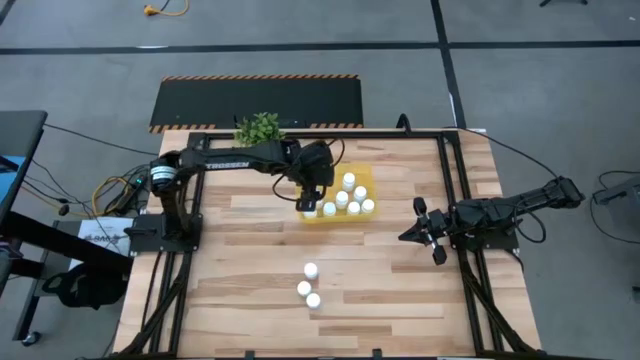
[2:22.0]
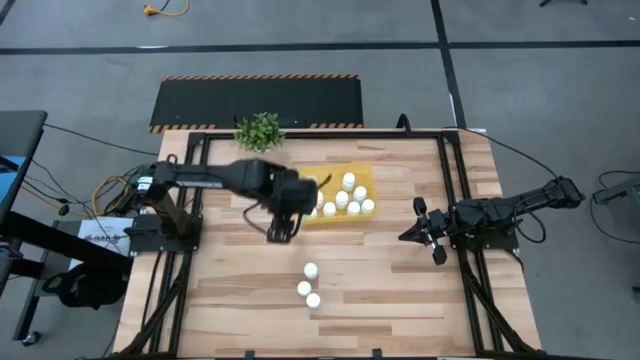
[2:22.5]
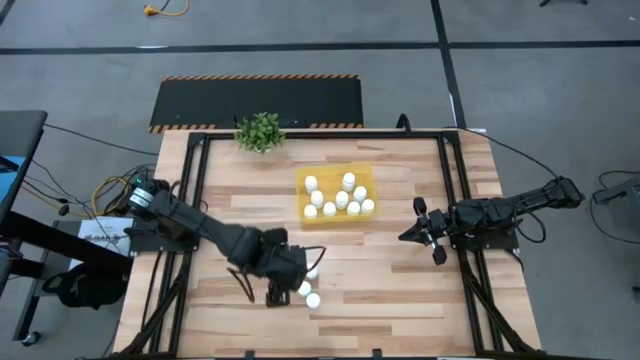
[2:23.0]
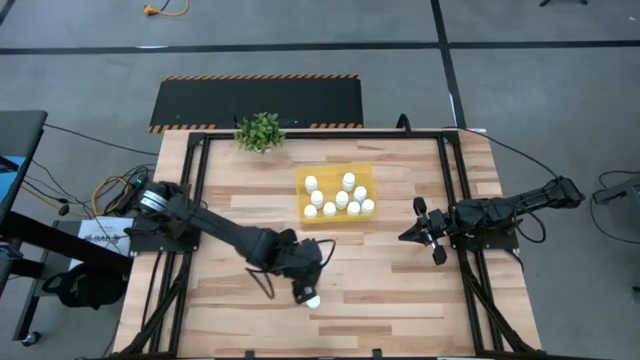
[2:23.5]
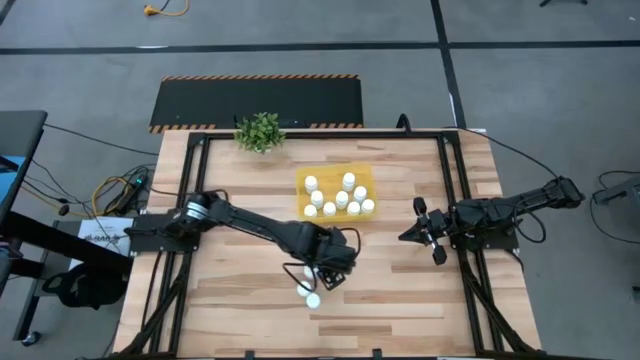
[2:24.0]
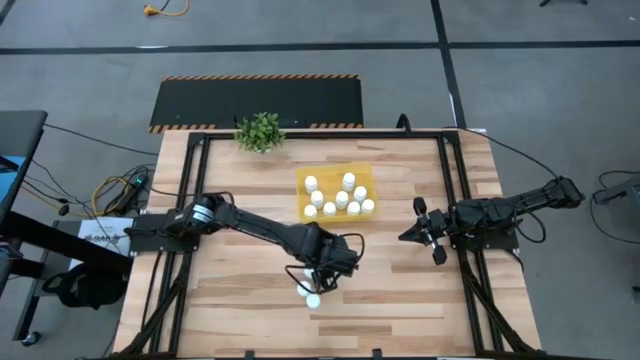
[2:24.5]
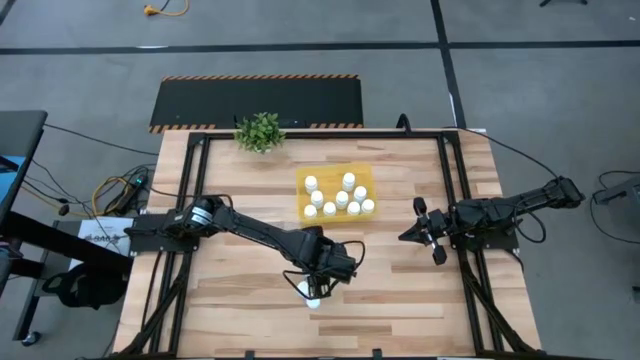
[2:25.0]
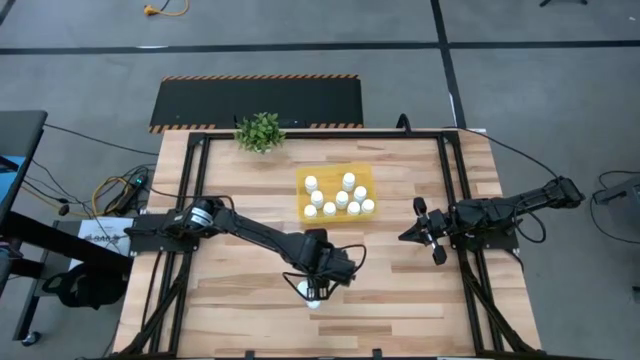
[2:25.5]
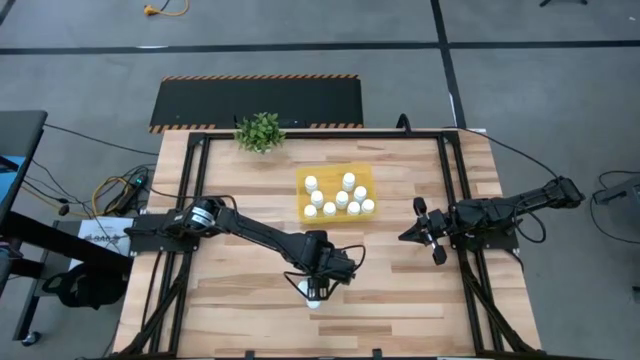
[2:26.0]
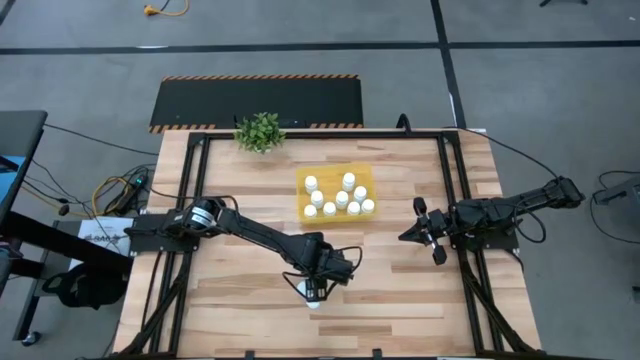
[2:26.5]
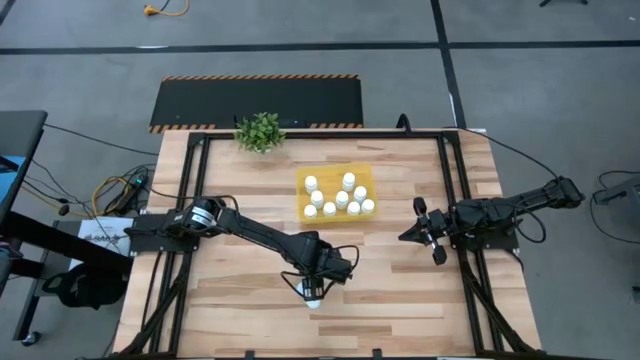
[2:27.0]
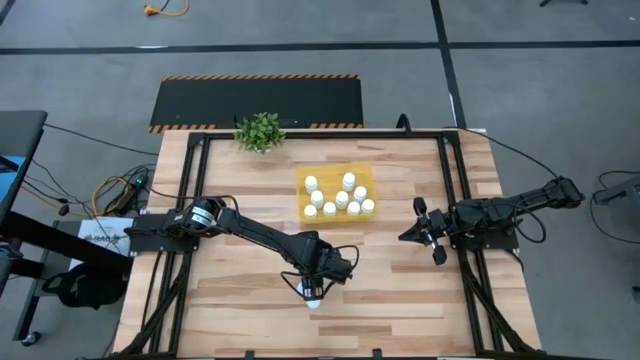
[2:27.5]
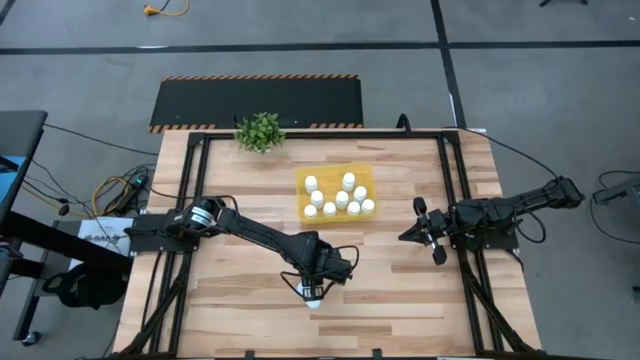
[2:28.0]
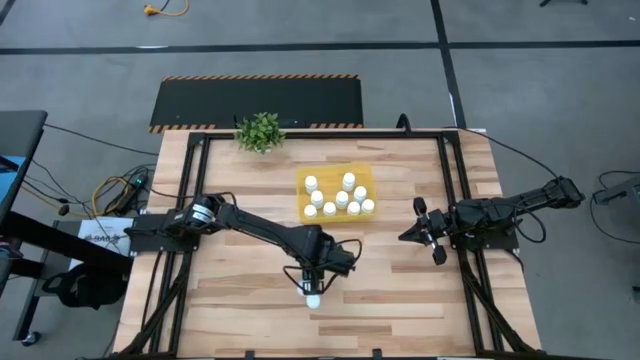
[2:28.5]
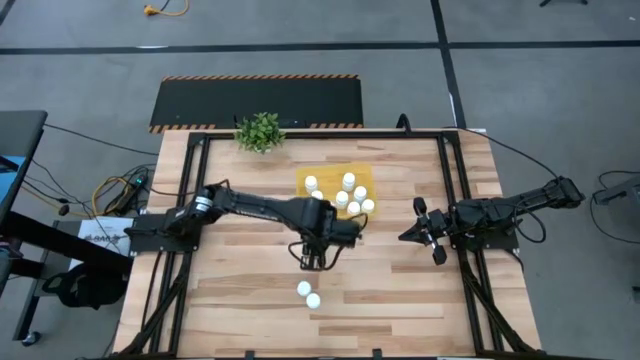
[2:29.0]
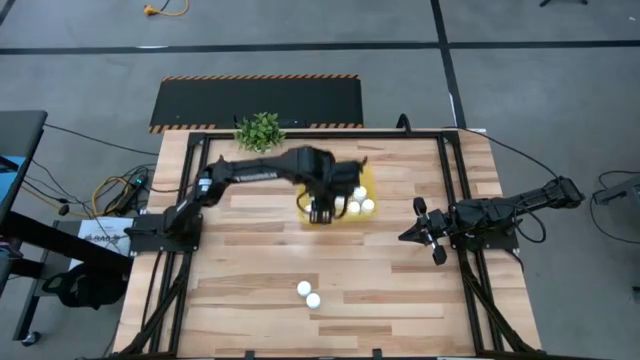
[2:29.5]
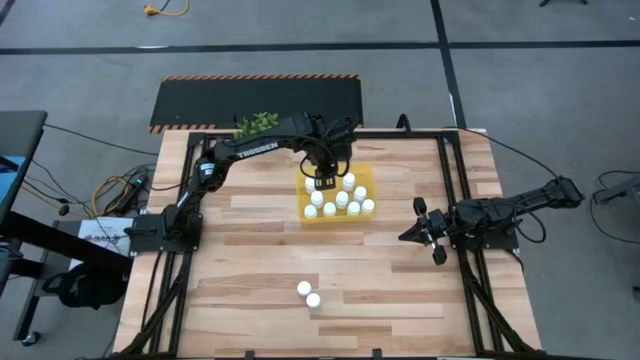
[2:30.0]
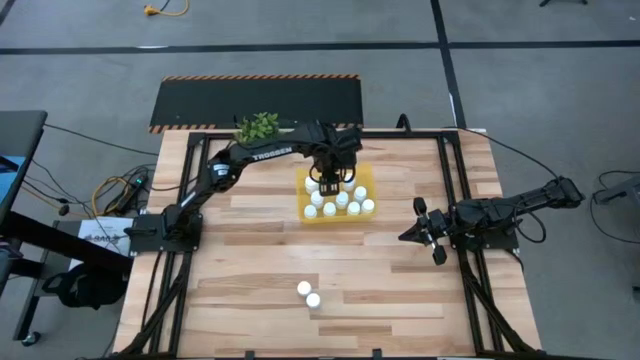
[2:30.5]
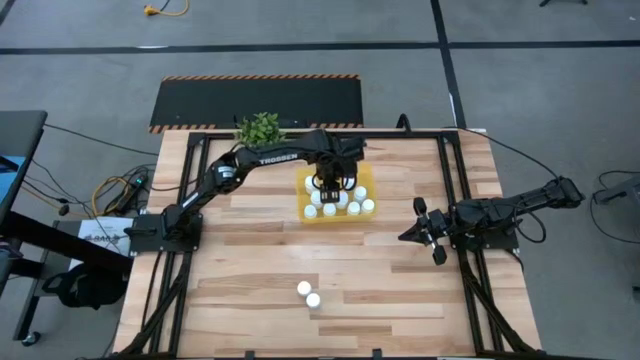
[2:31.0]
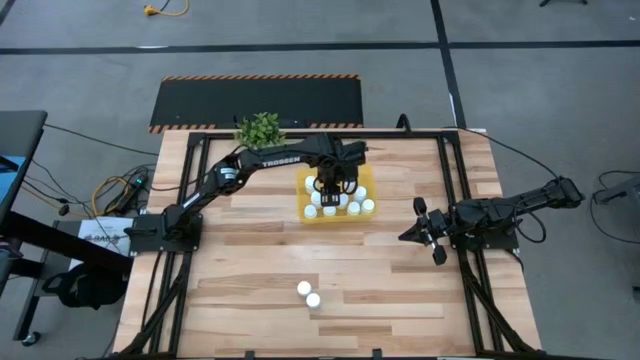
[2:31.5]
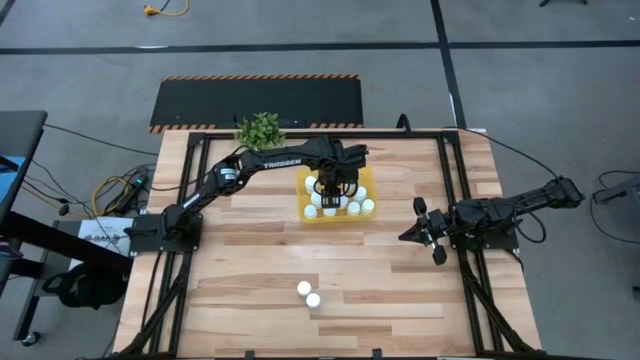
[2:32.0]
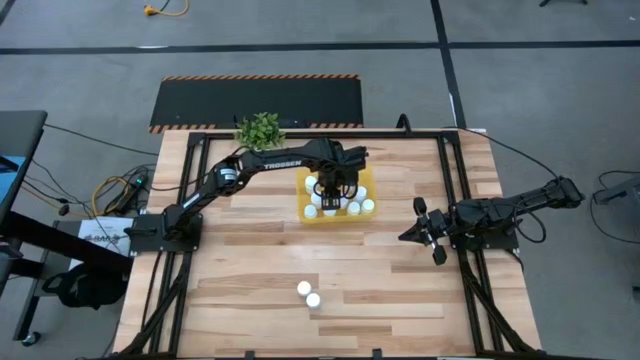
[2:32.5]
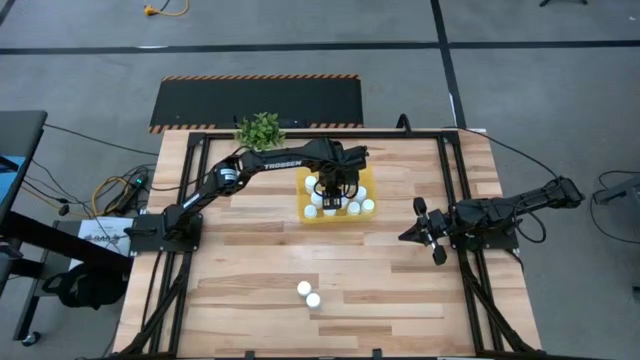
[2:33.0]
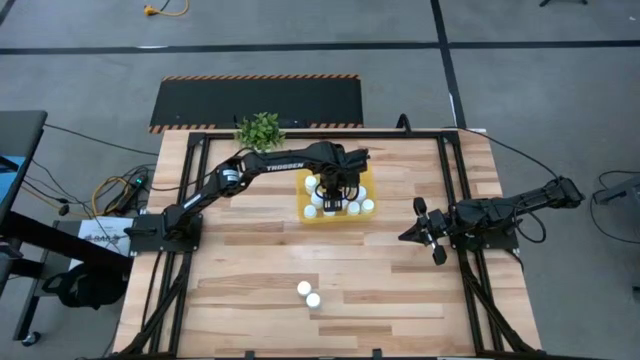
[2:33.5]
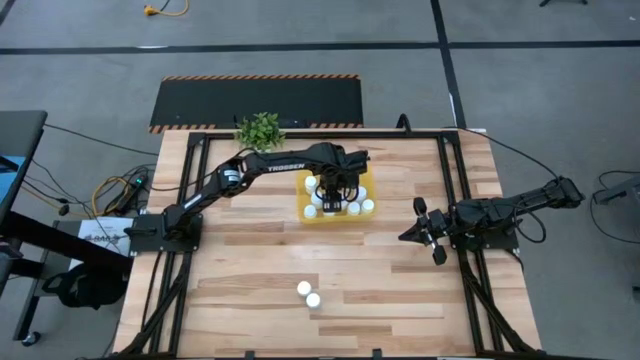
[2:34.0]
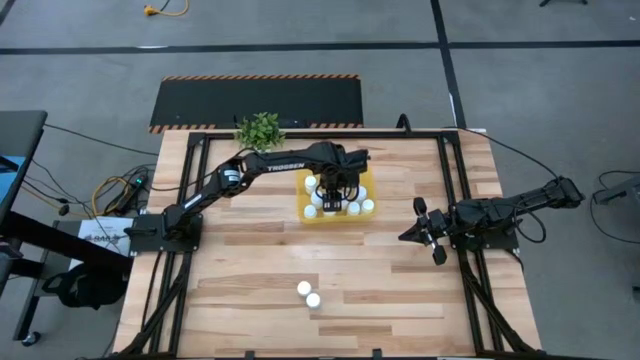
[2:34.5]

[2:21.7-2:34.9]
Task: Pick and place pill bottles into a basket
Put the white medicine bottle into the yellow bin

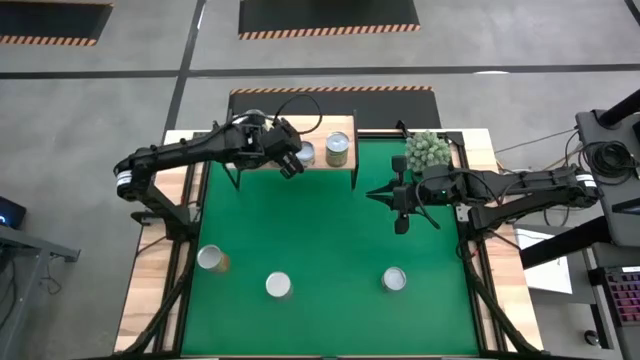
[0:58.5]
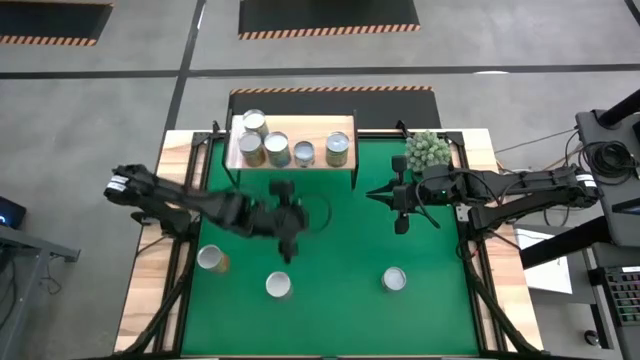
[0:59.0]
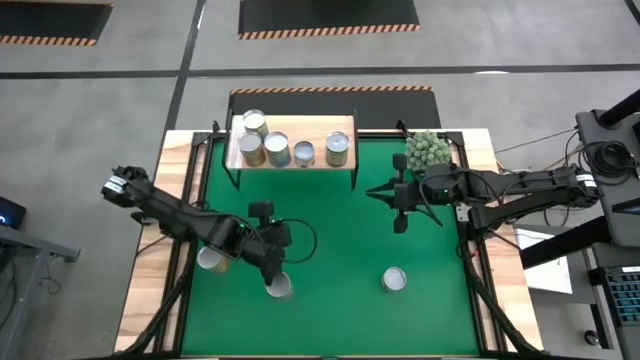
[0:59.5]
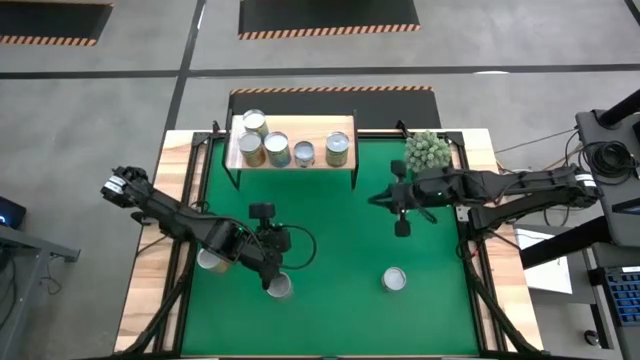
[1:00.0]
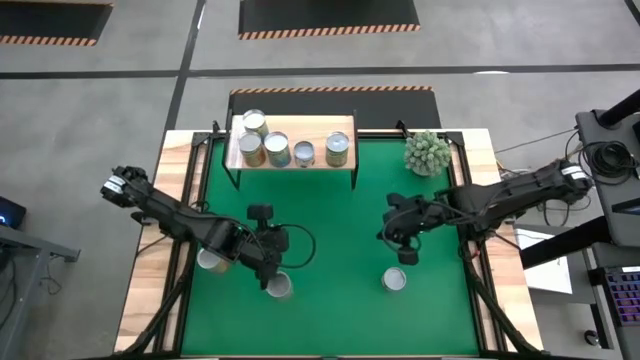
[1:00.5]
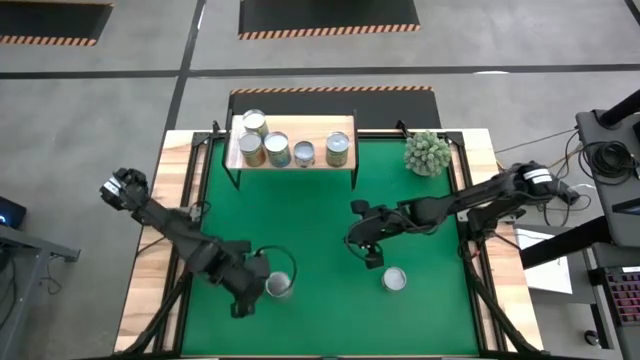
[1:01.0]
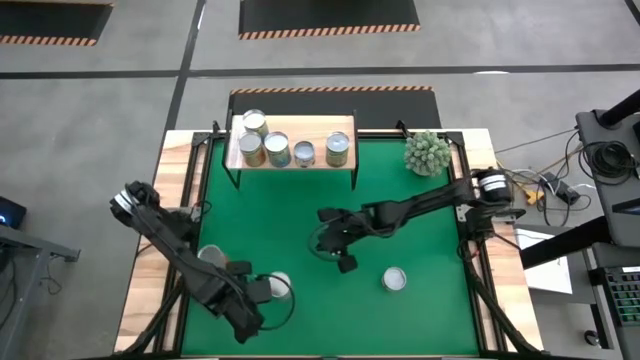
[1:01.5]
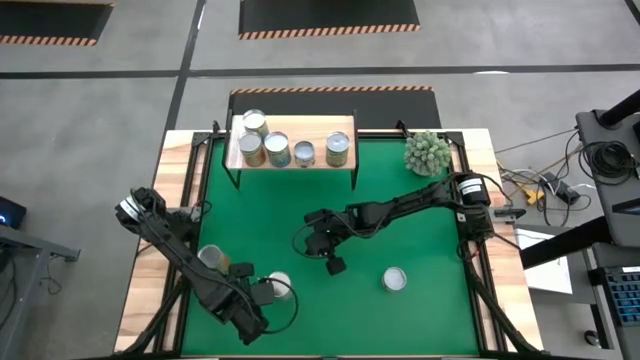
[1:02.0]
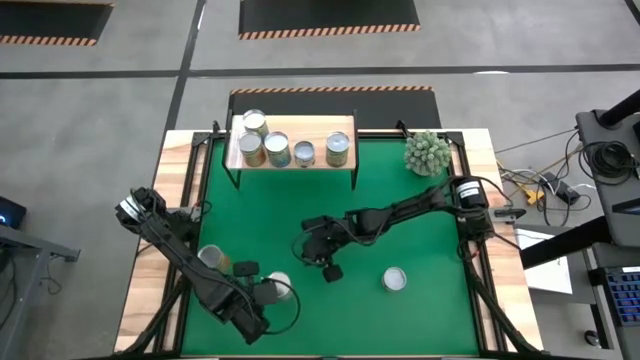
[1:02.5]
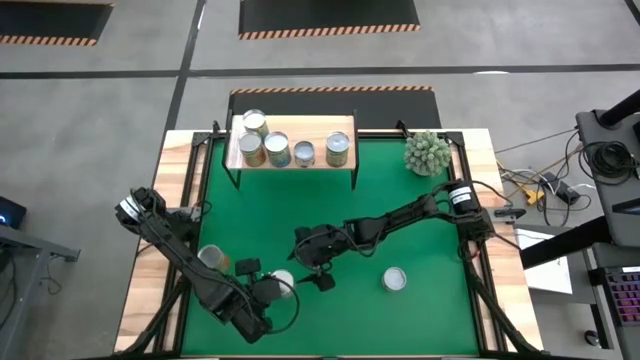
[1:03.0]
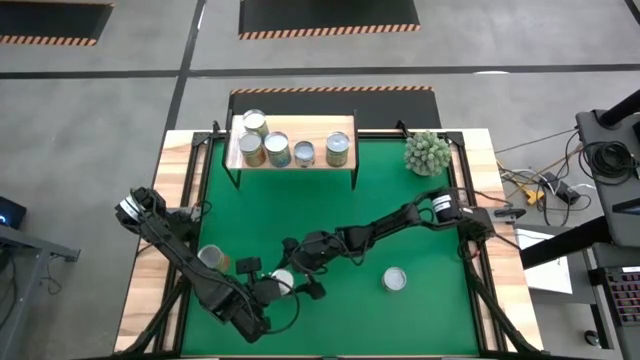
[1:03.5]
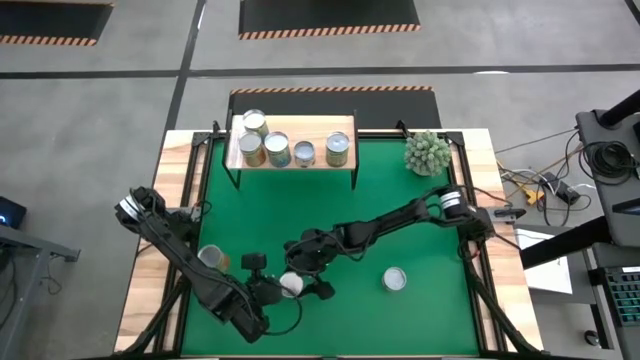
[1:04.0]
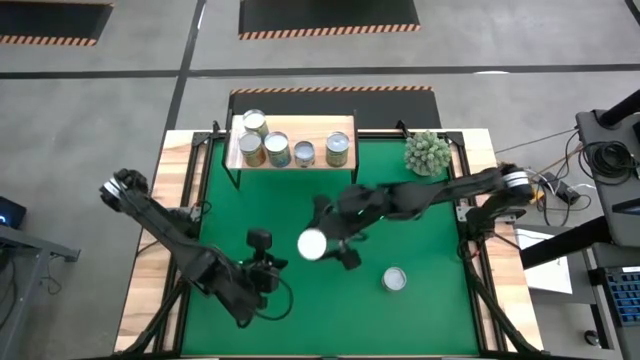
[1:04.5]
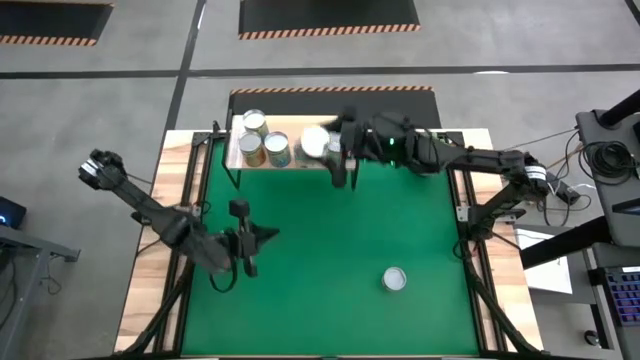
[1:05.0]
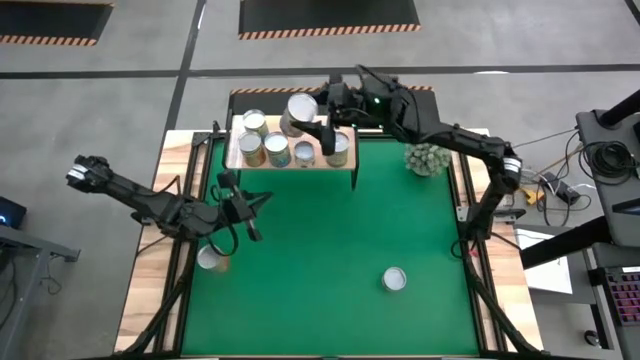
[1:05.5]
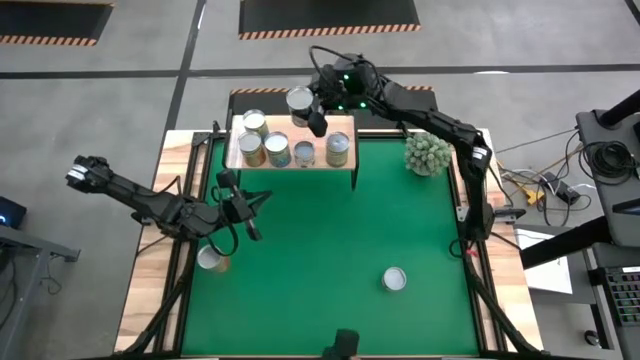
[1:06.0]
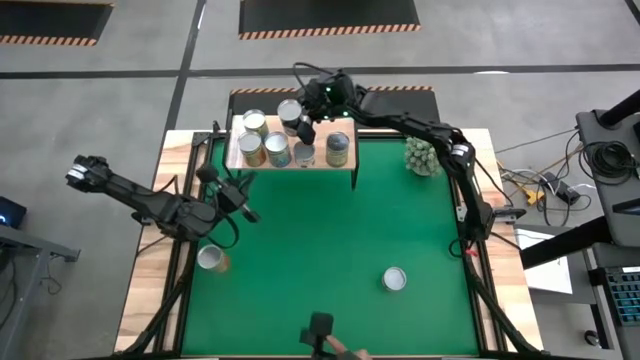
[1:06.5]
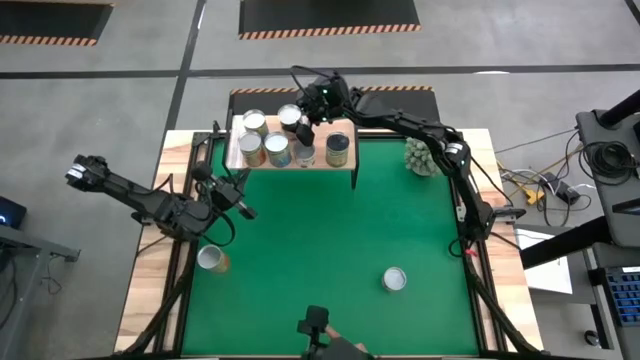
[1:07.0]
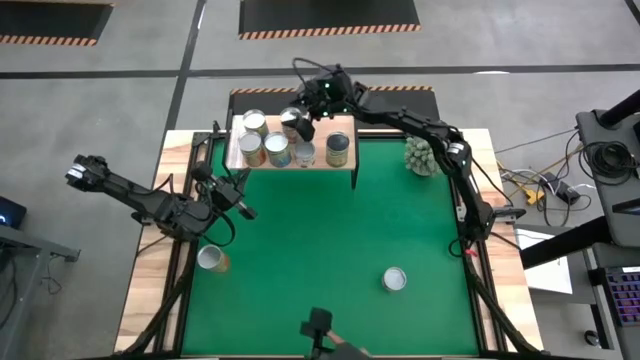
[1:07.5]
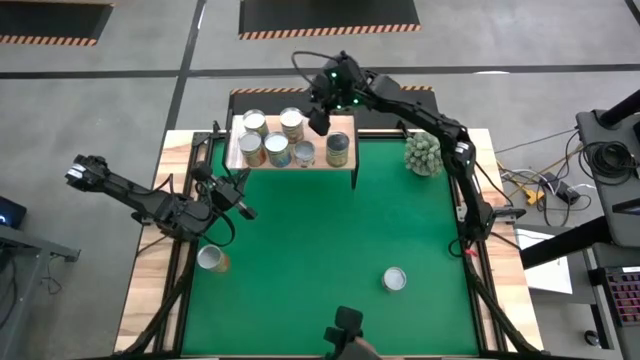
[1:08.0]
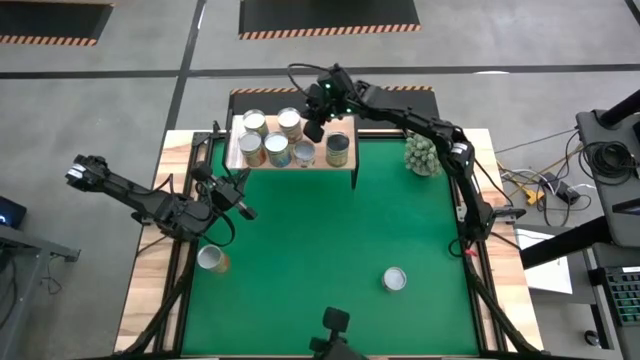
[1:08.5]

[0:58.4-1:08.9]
Task: Pick and place cans onto a shelf
Put the canned peaches on the shelf
